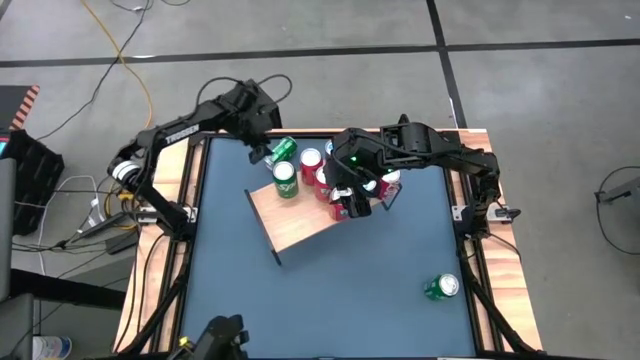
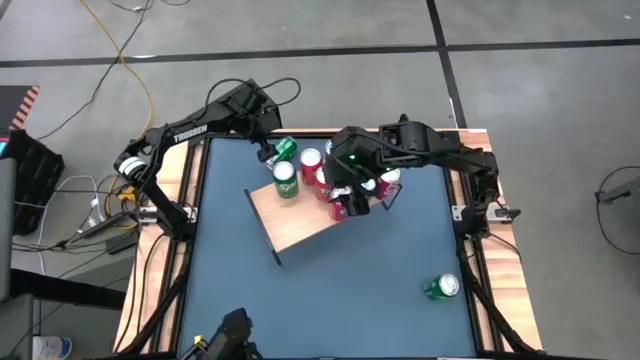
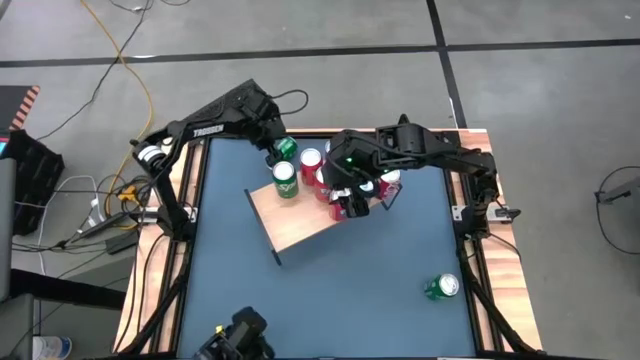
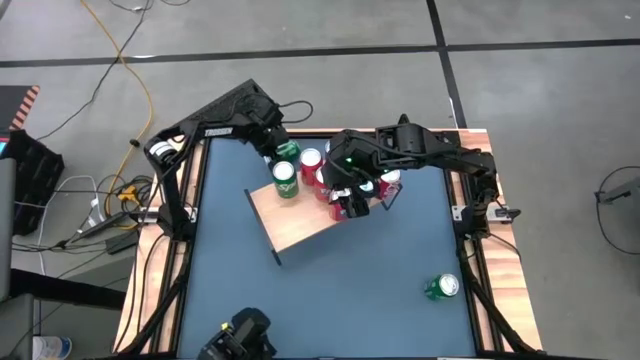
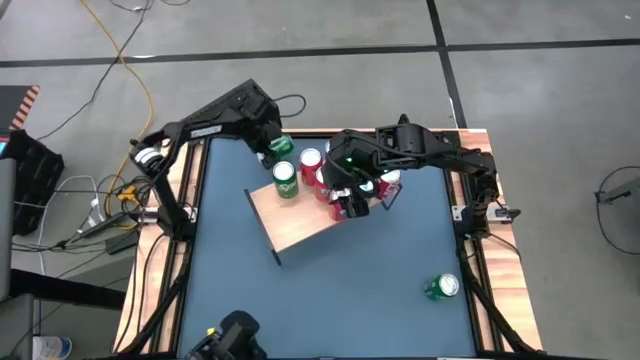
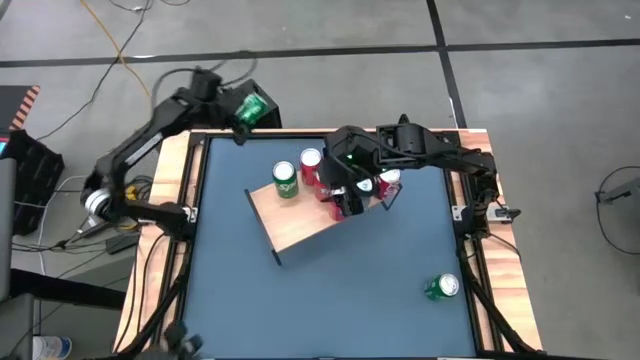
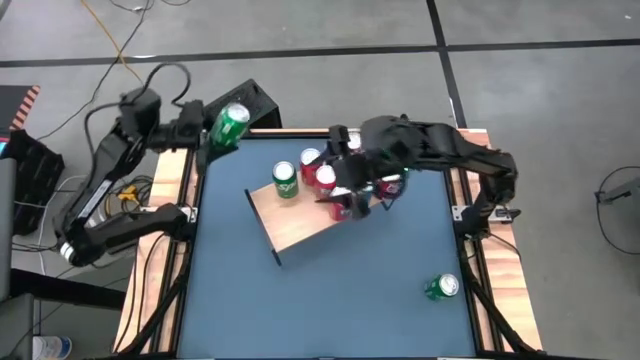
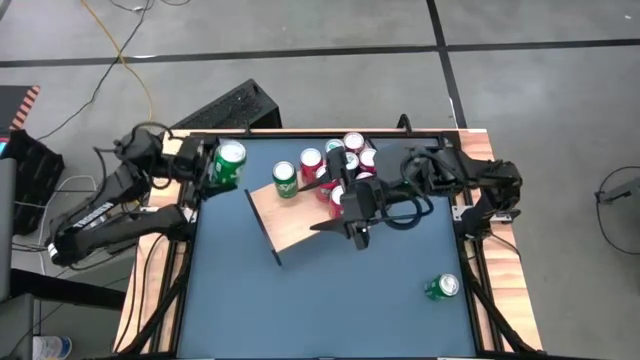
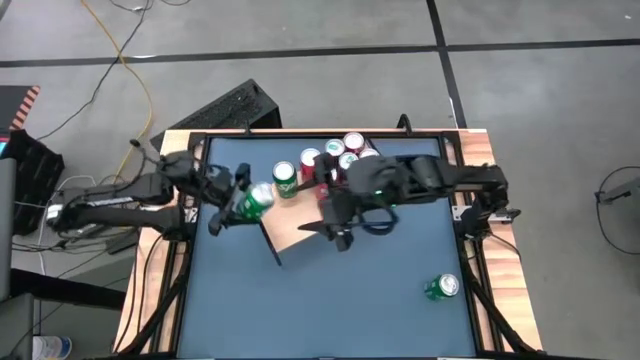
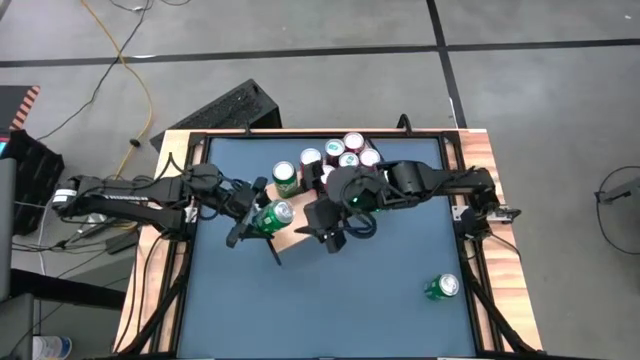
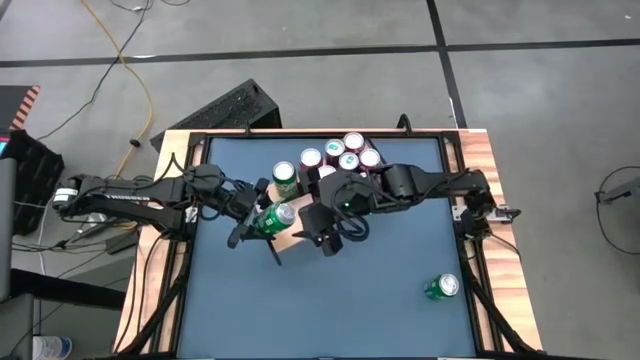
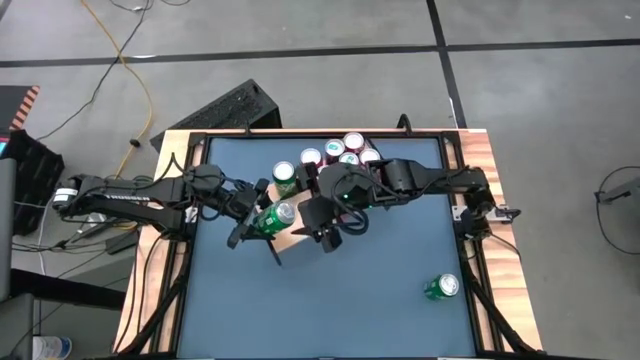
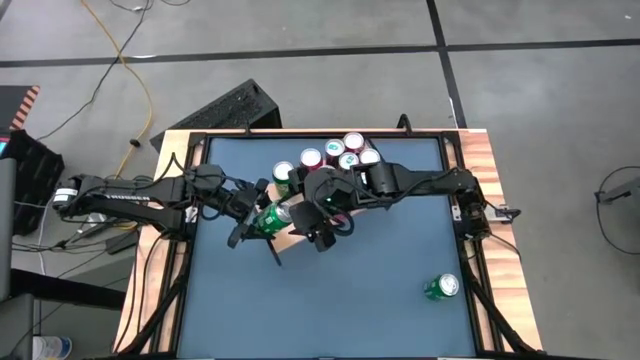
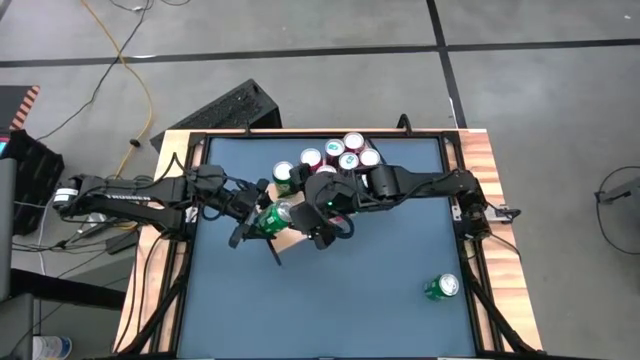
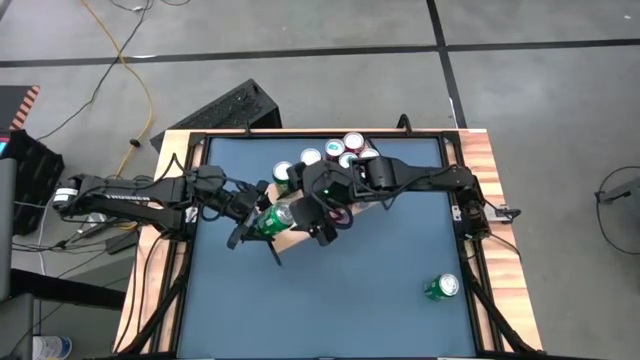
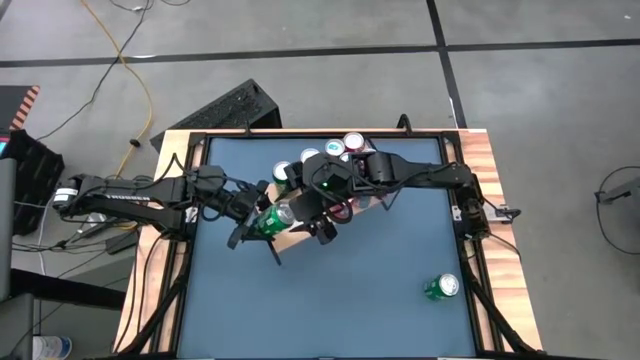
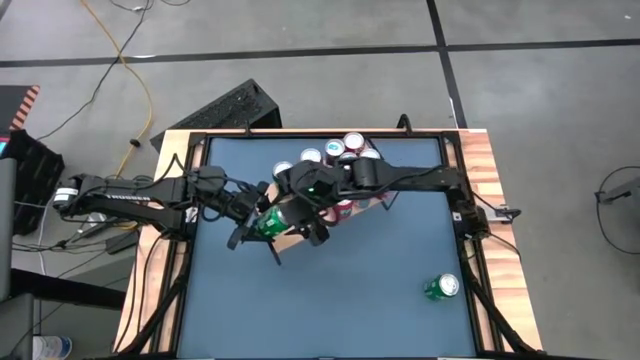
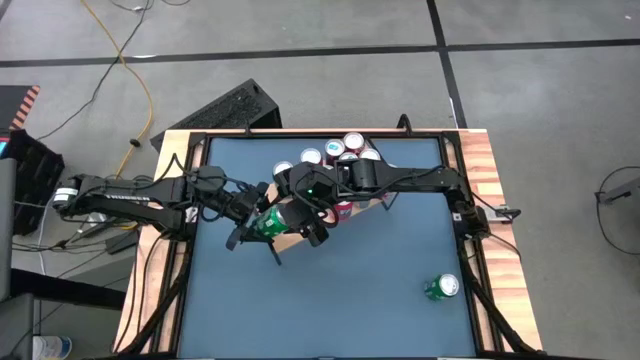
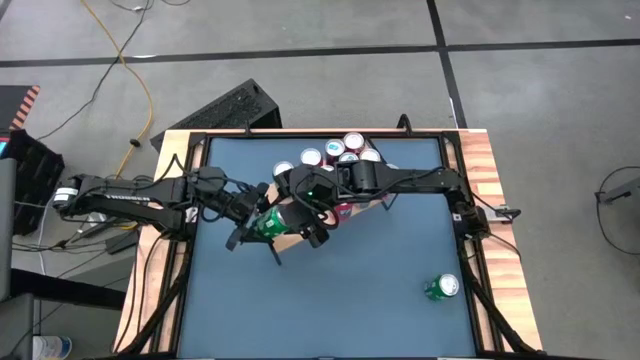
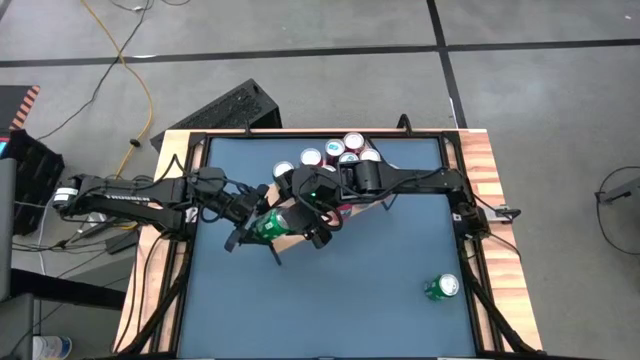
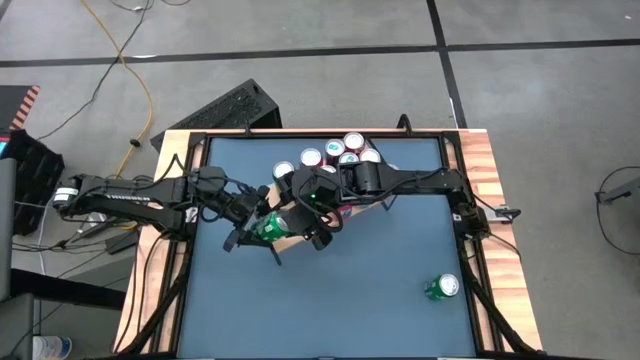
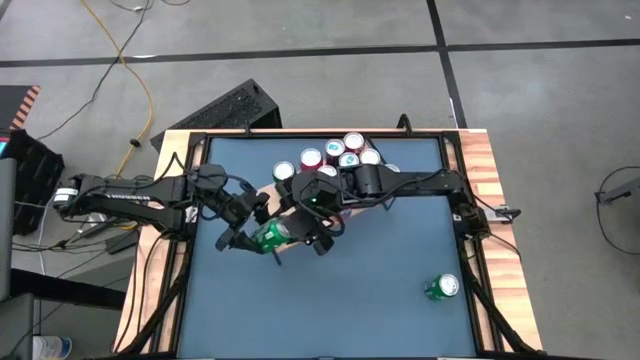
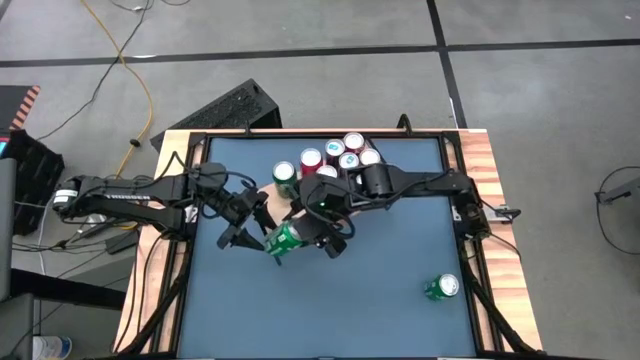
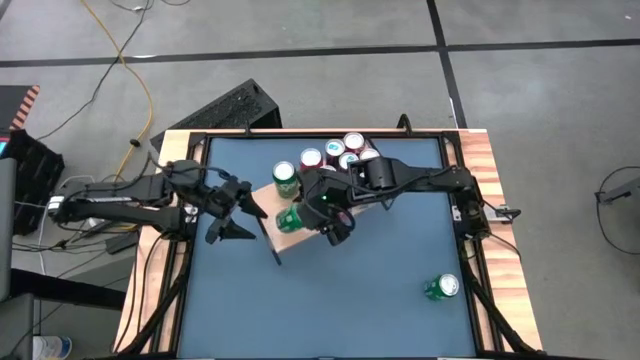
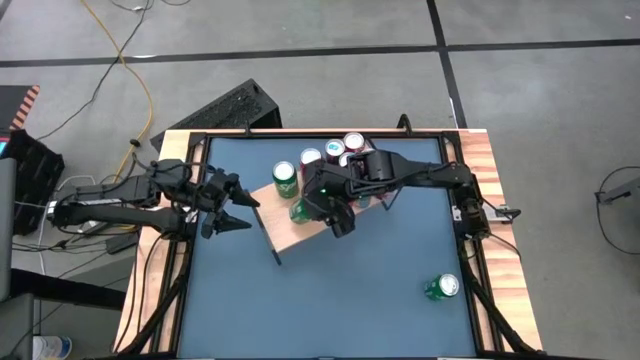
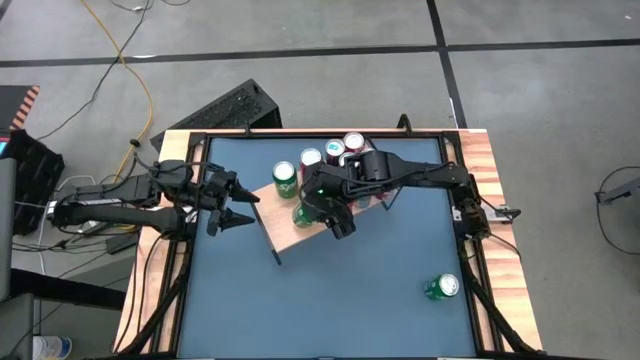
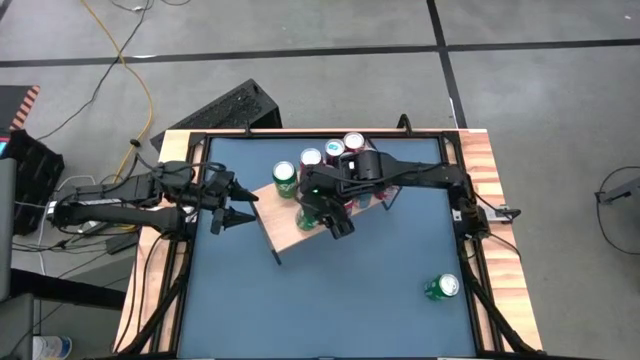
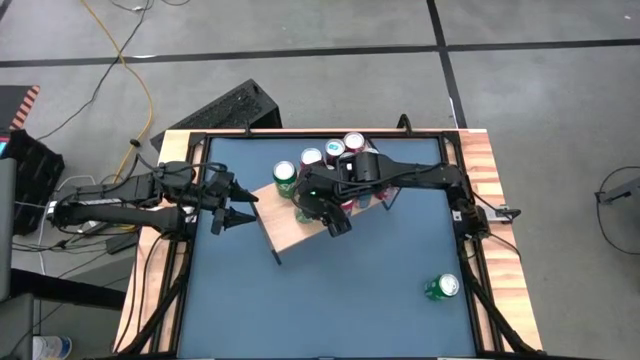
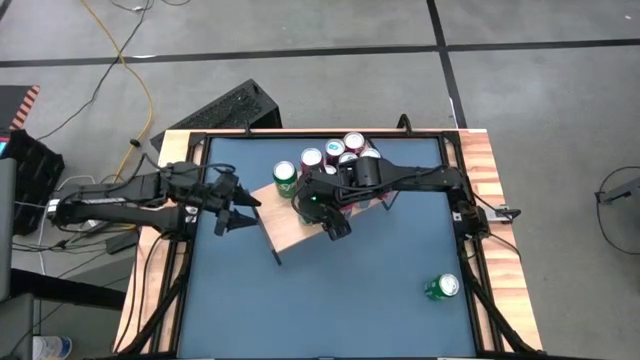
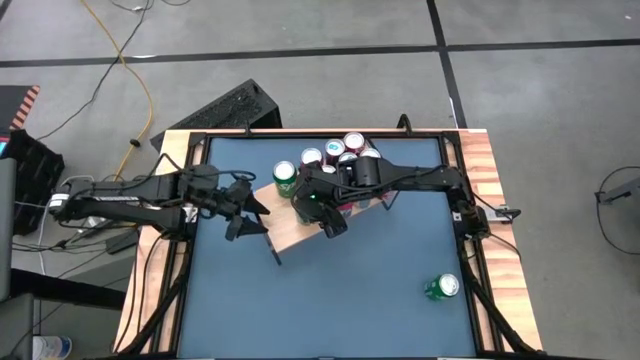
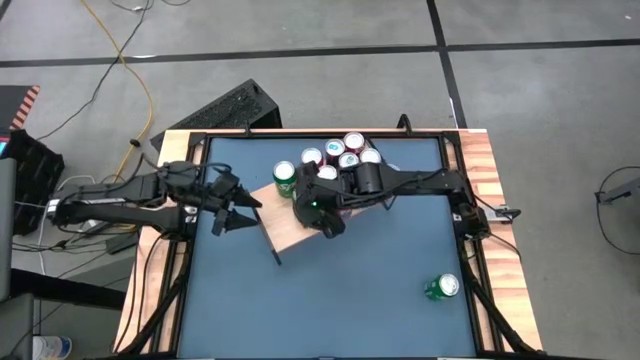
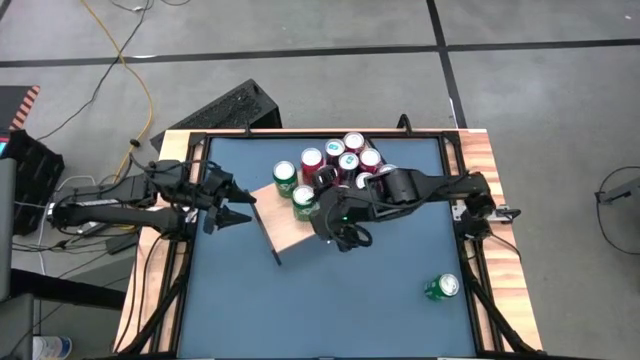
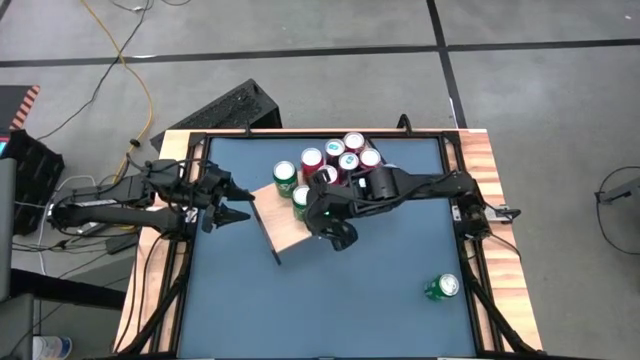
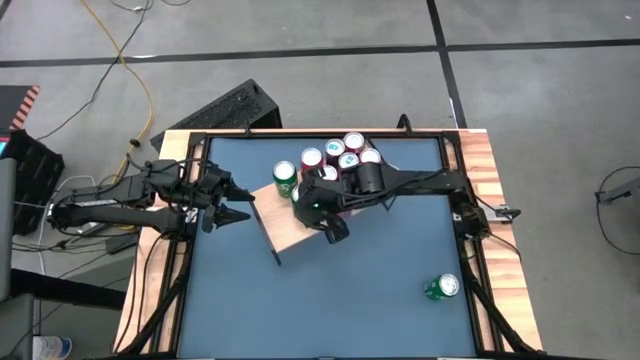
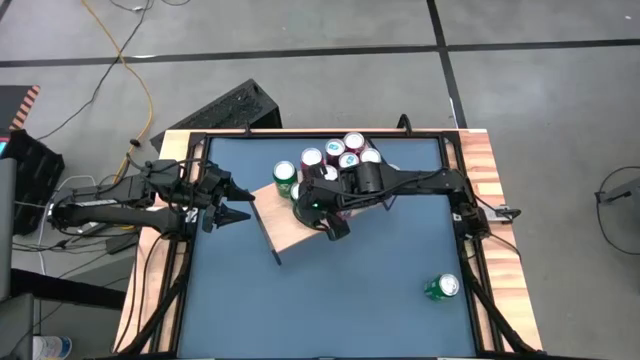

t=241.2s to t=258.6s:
Task: Place canned beverage on shelf
Put the top green soda can on the shelf aligned with the other green soda can

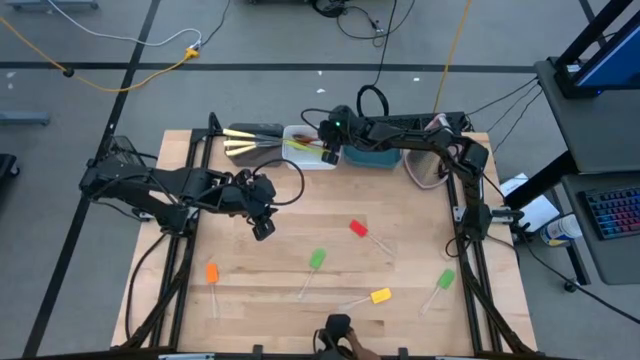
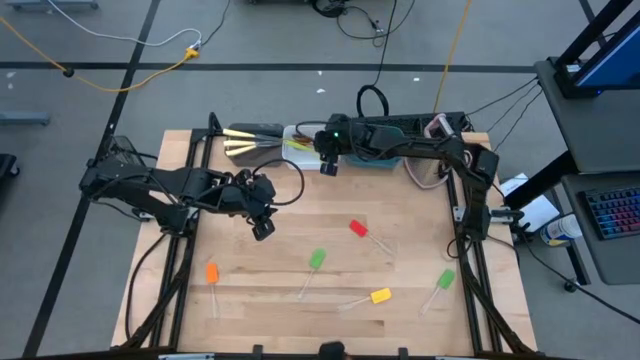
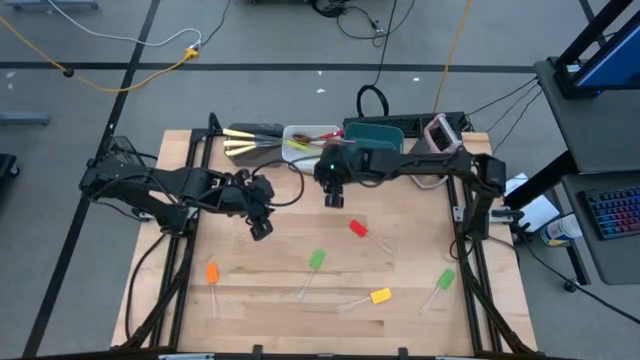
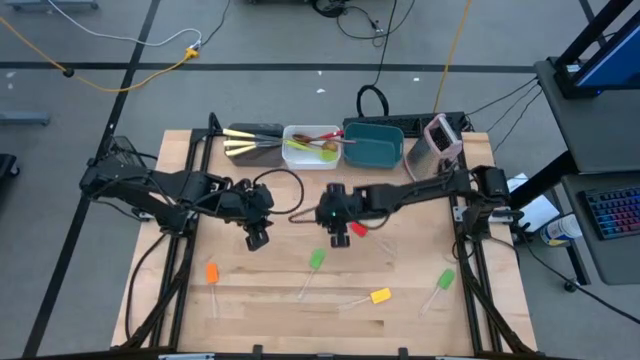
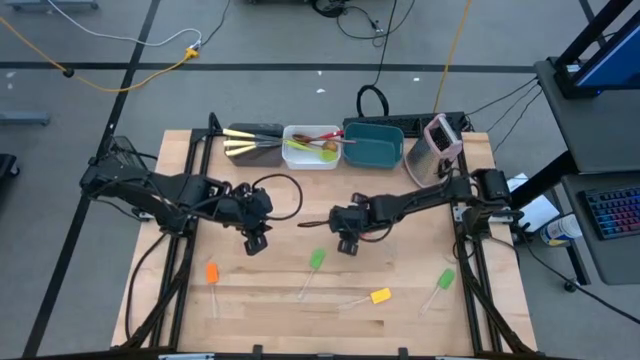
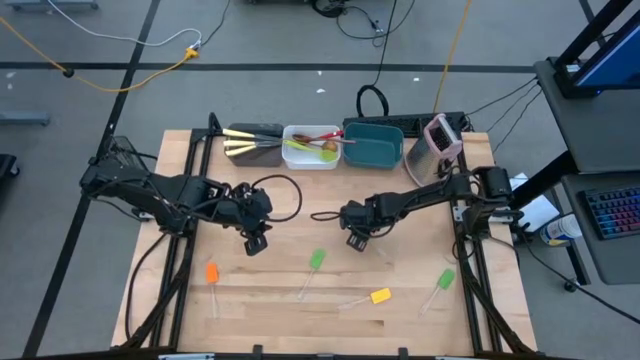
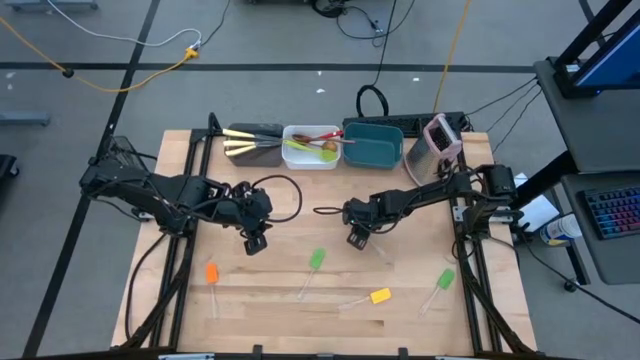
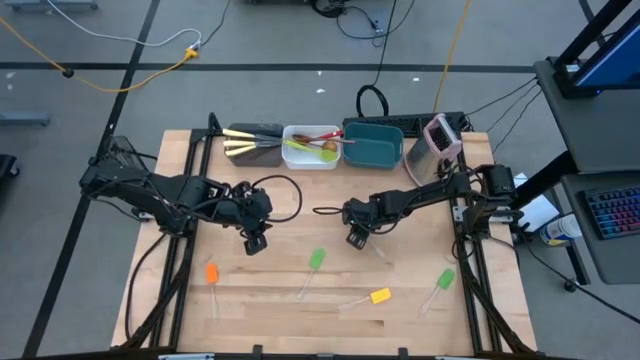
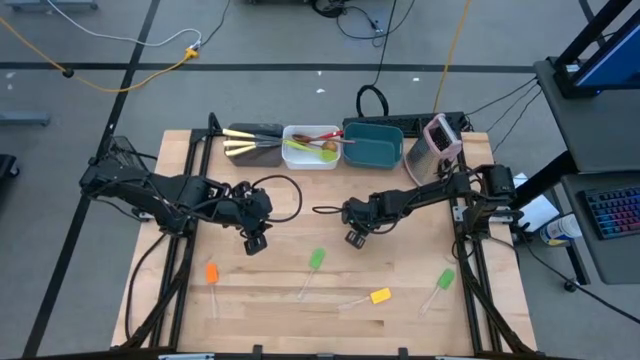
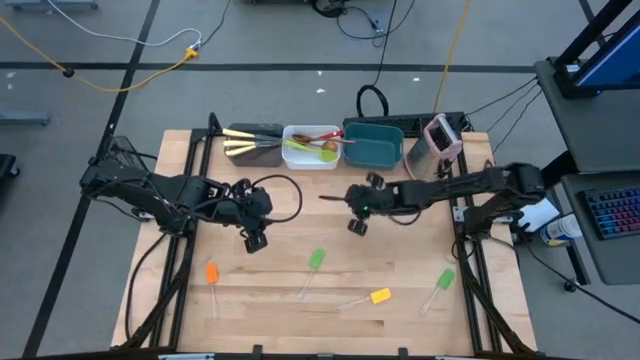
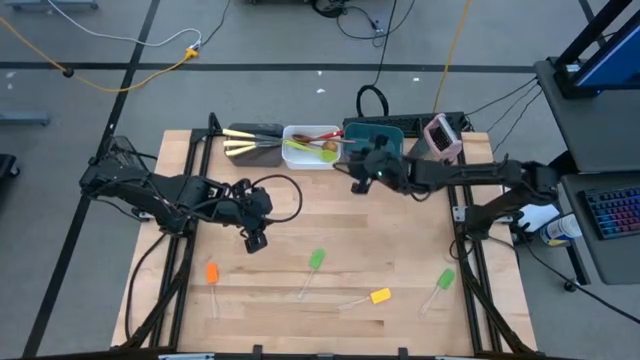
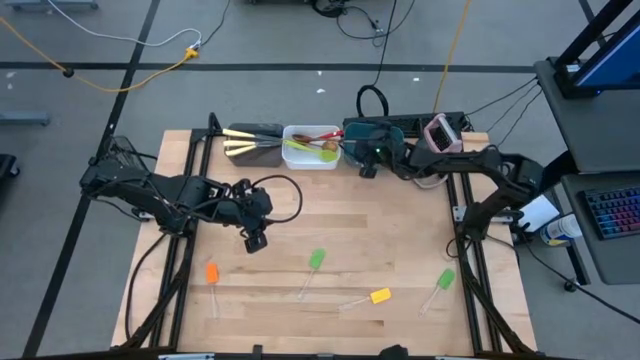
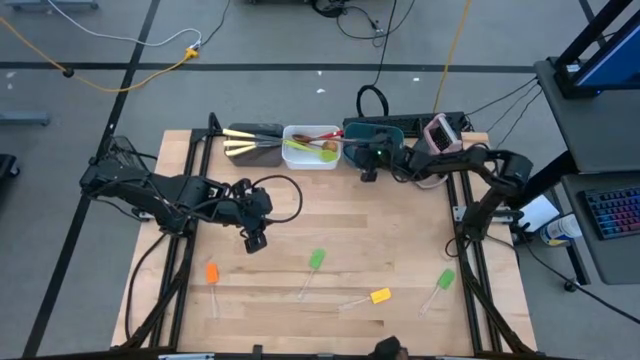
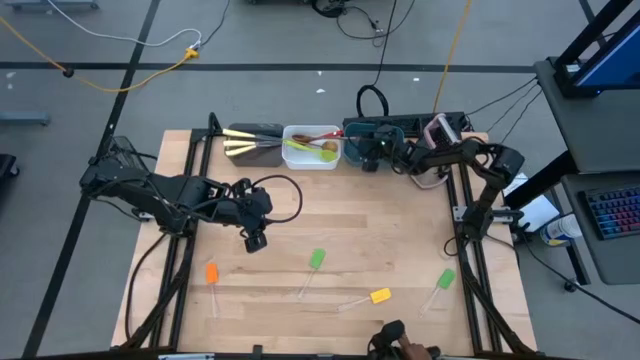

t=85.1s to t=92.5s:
Task: Pick & Place Kitchen Items
Put the red spatula into the blue bin
